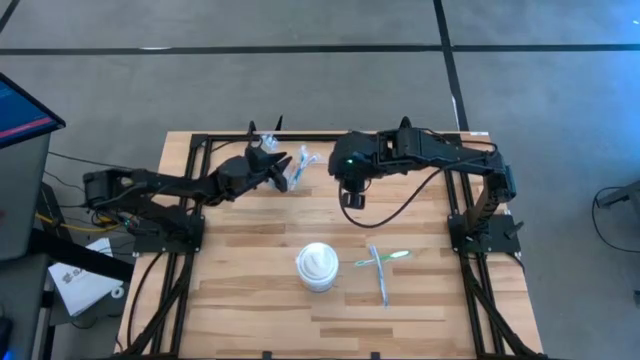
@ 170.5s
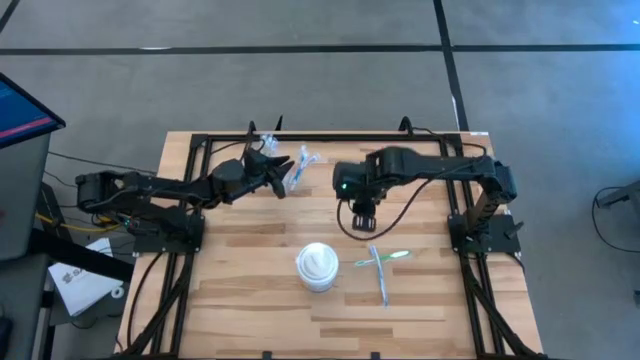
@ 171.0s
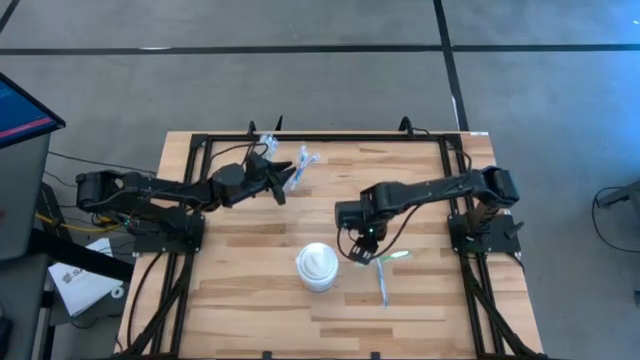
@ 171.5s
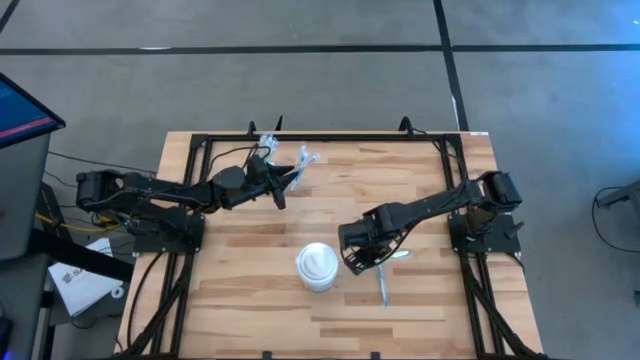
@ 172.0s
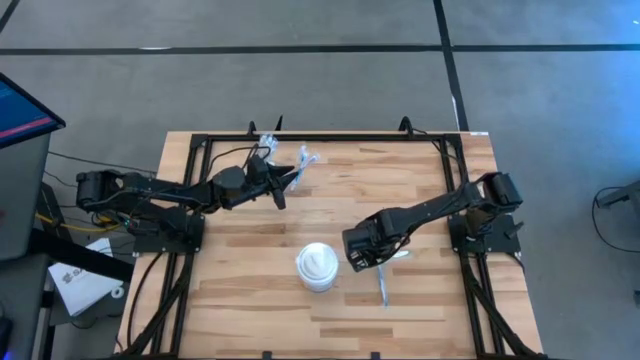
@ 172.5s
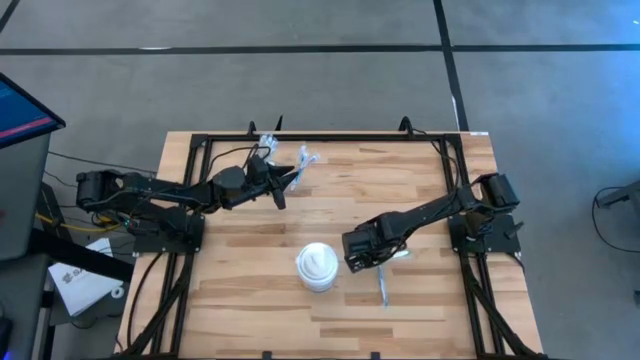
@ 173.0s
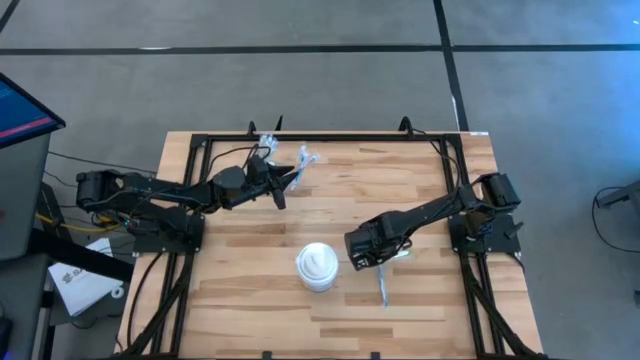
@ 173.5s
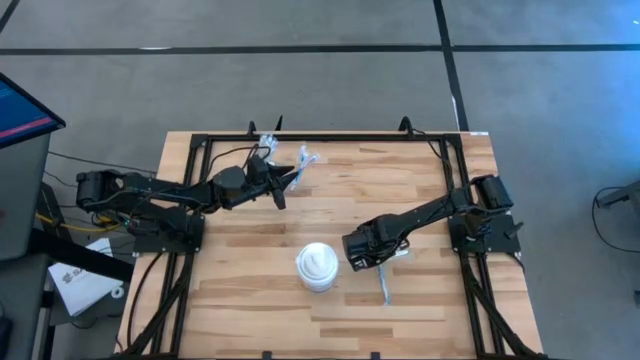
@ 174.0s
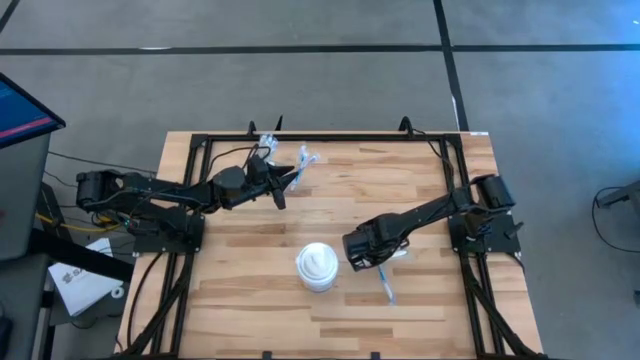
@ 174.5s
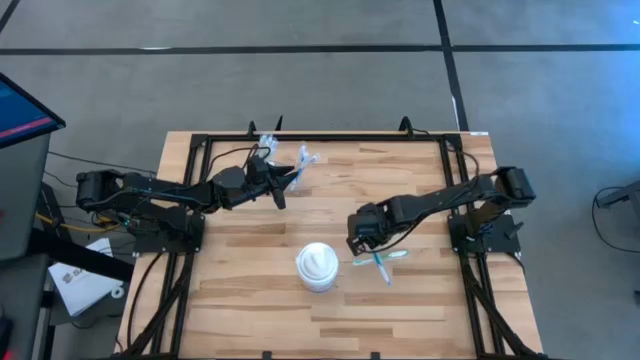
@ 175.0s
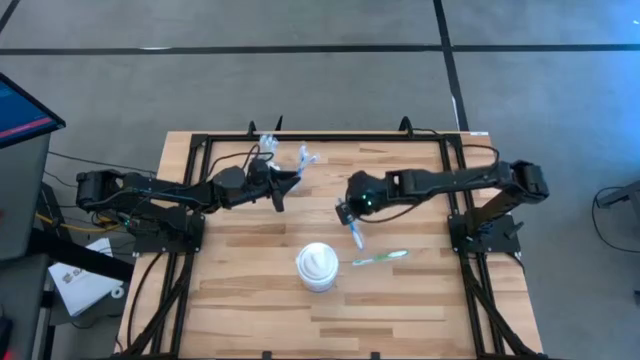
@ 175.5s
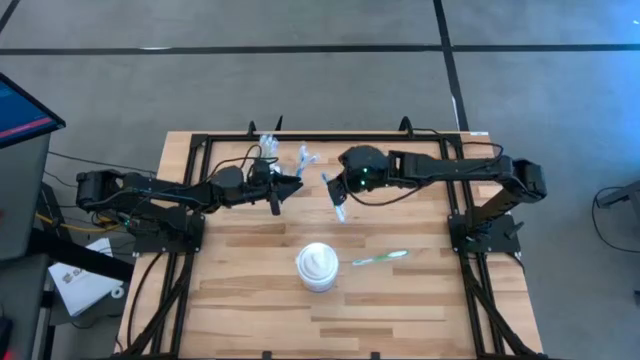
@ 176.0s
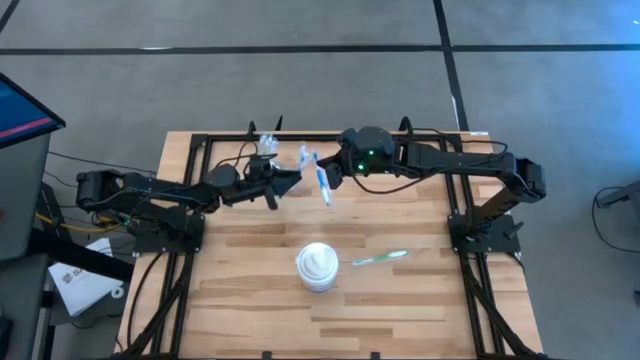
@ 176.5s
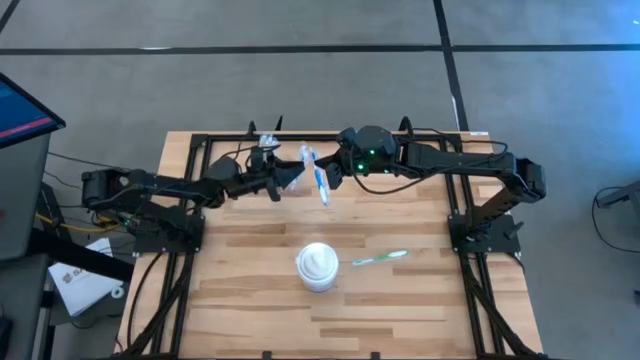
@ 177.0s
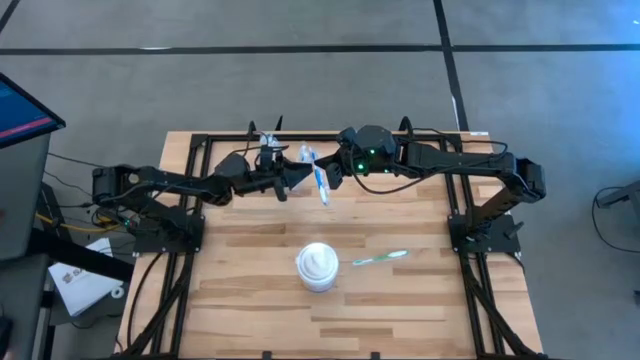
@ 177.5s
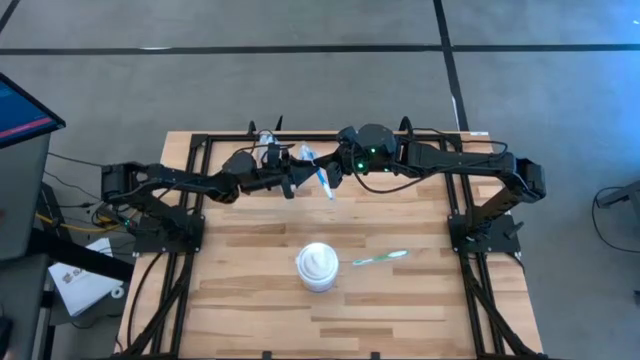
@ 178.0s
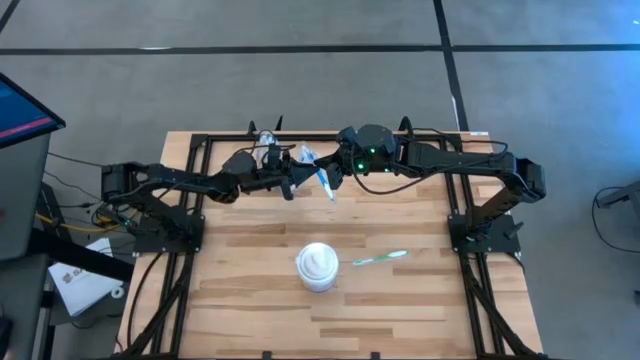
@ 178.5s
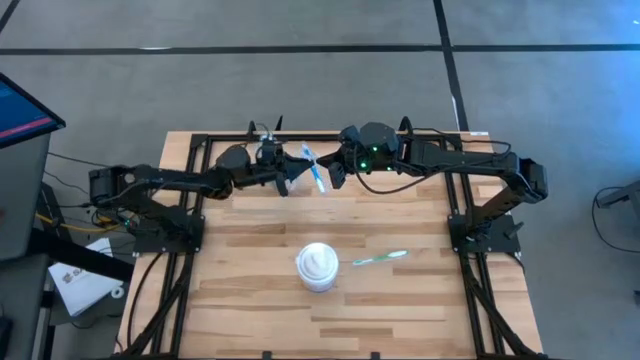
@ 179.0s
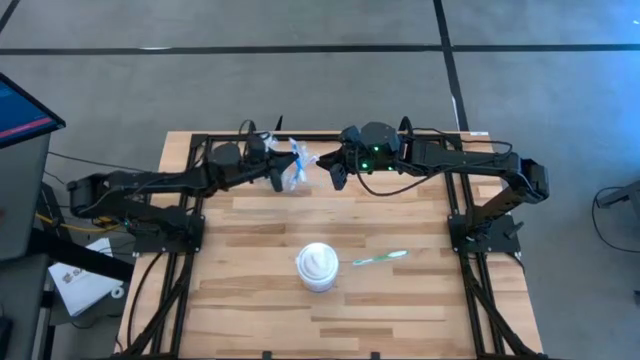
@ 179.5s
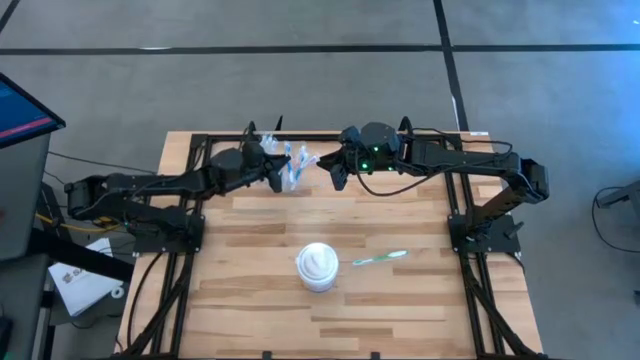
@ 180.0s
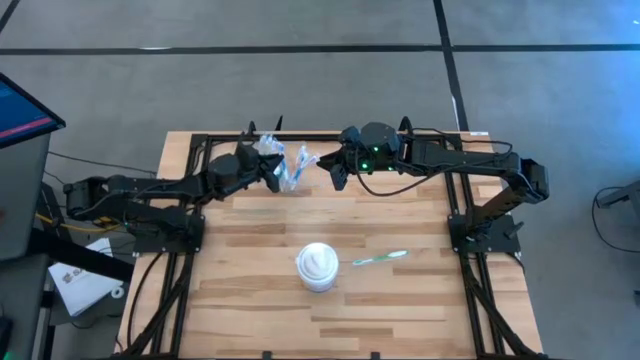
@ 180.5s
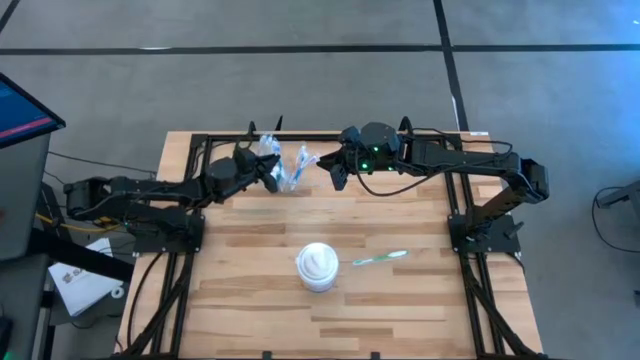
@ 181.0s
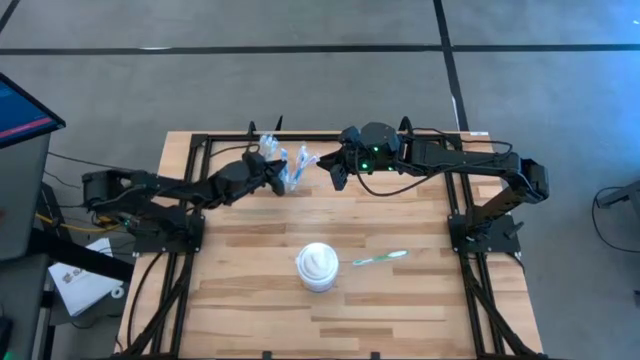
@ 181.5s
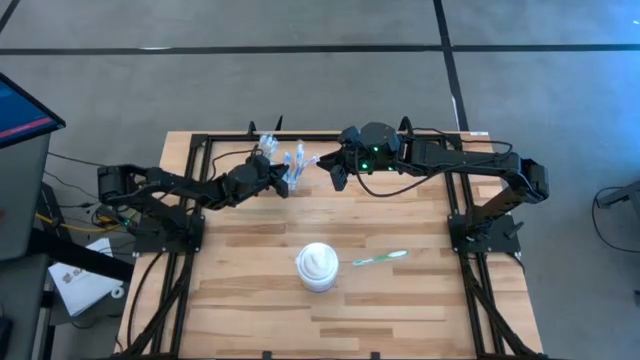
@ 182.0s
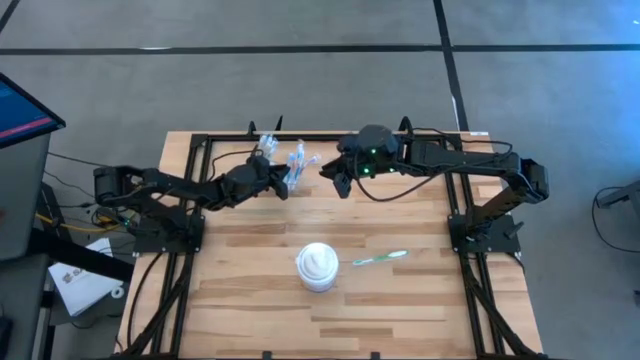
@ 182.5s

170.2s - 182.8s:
Task: Pick & Place toothbrushing station
Put the blue toothbrush into the transparent organizer

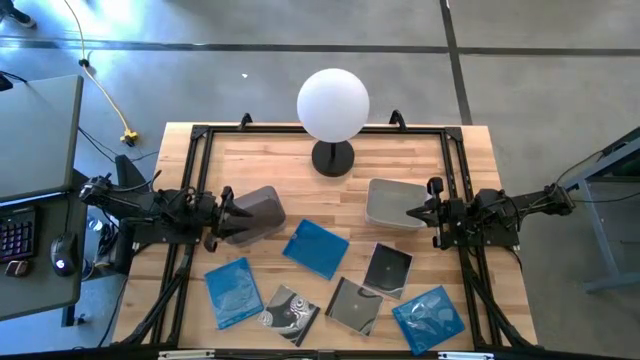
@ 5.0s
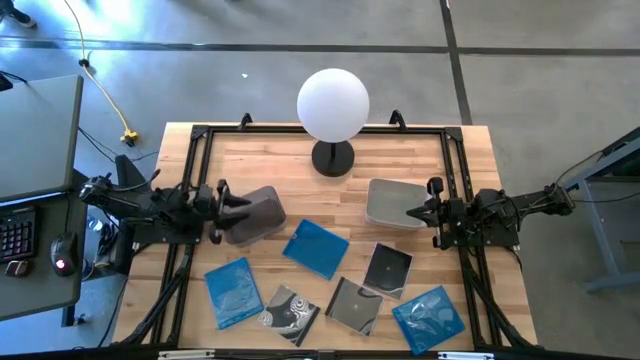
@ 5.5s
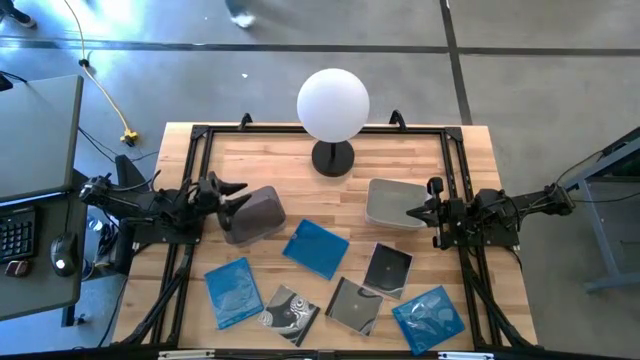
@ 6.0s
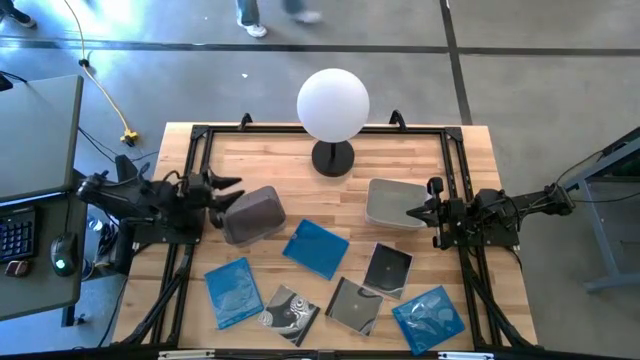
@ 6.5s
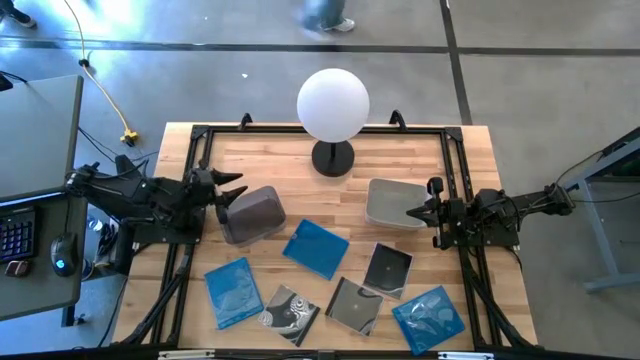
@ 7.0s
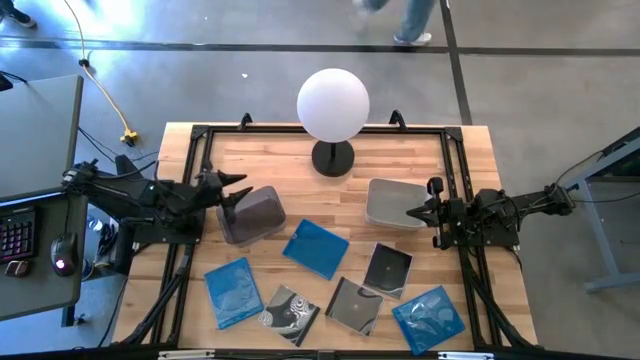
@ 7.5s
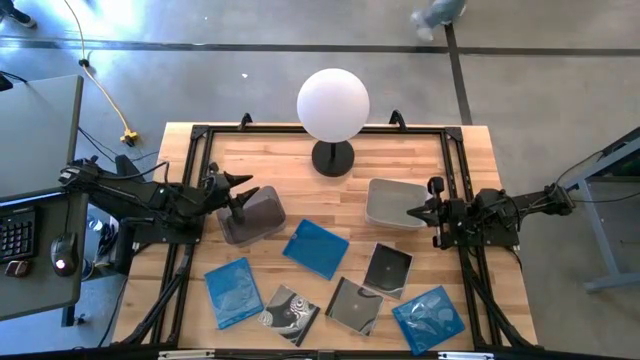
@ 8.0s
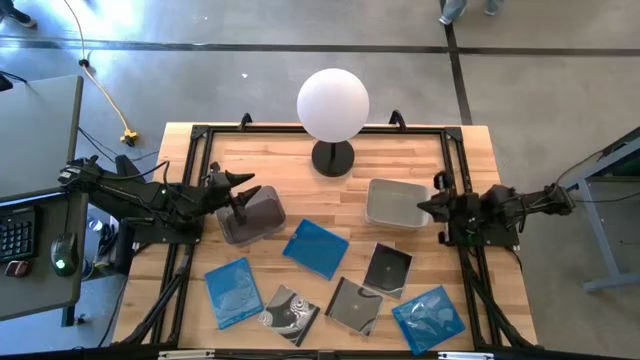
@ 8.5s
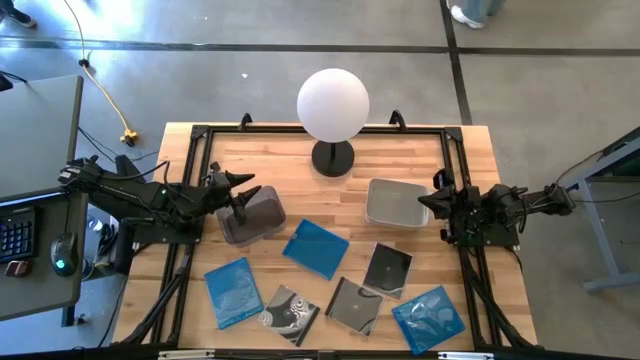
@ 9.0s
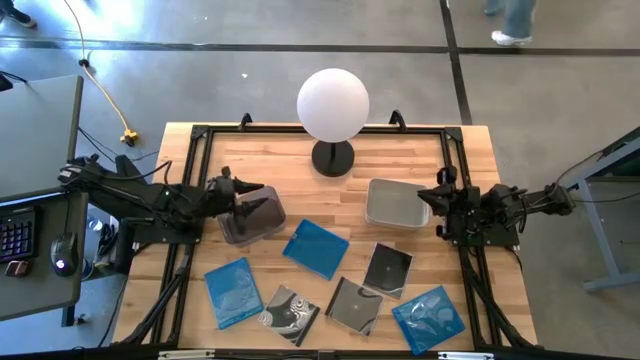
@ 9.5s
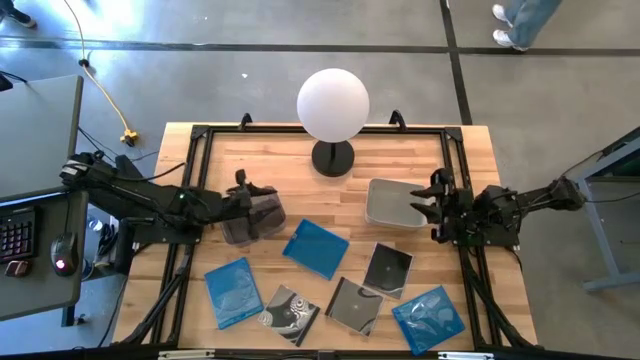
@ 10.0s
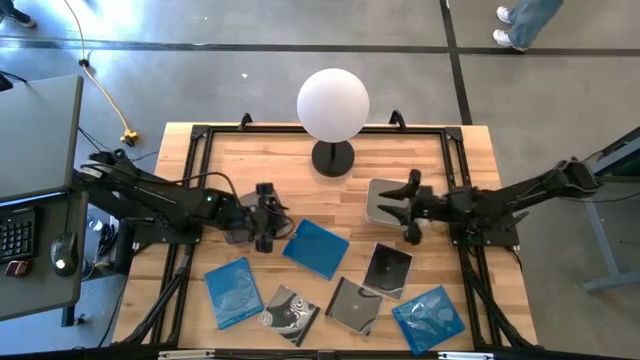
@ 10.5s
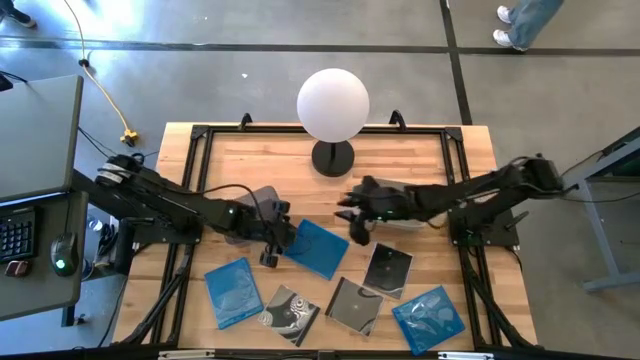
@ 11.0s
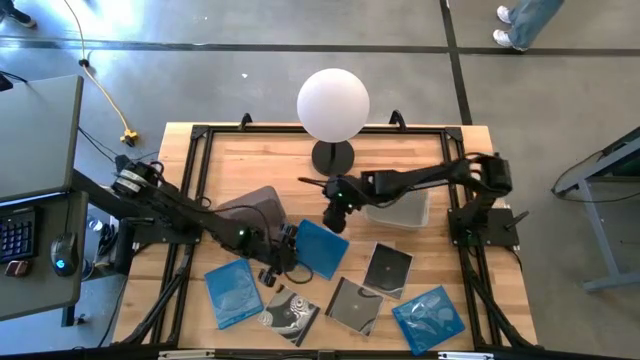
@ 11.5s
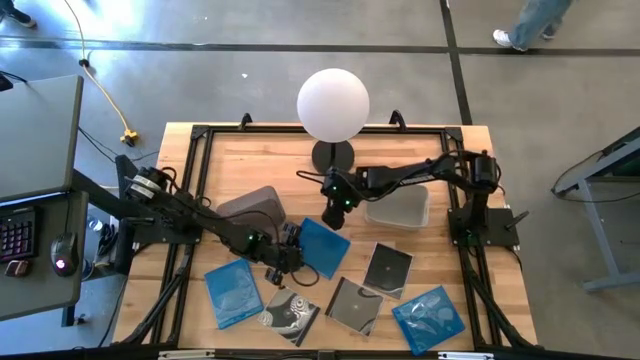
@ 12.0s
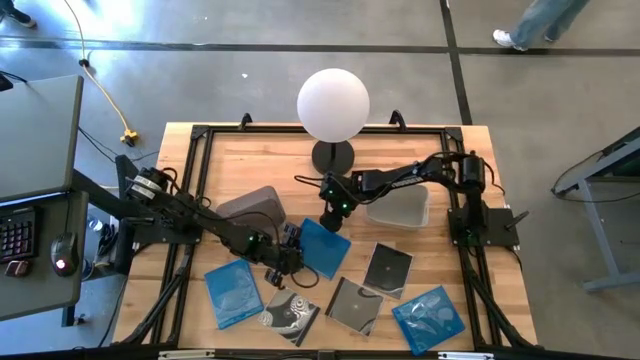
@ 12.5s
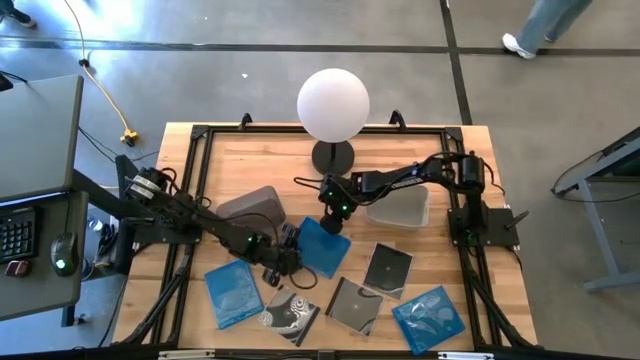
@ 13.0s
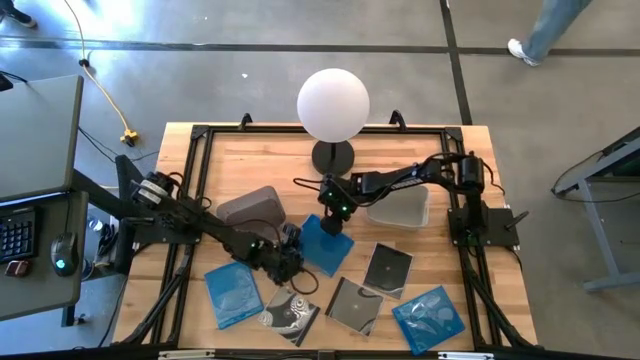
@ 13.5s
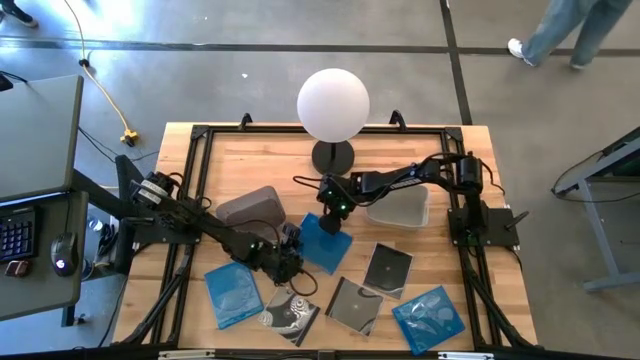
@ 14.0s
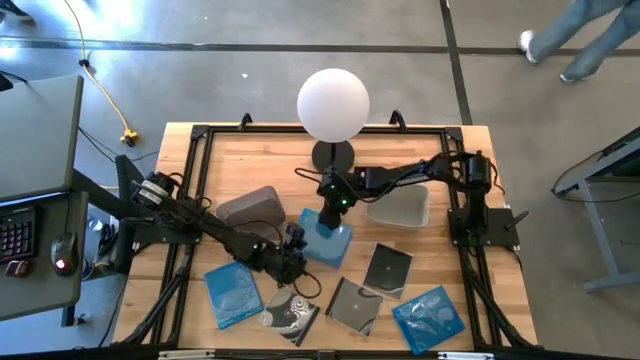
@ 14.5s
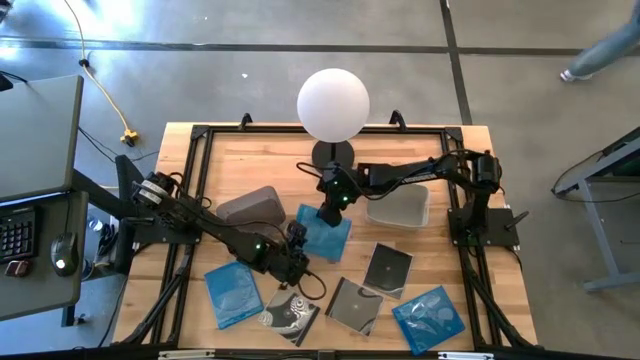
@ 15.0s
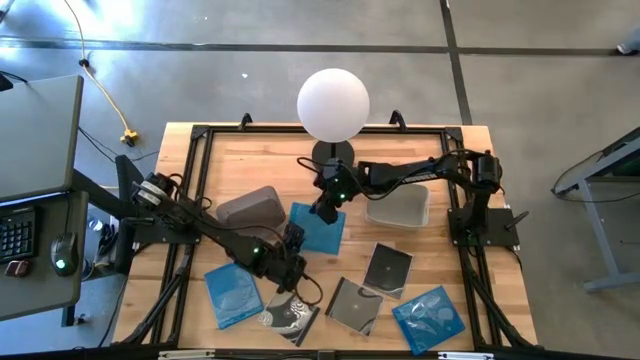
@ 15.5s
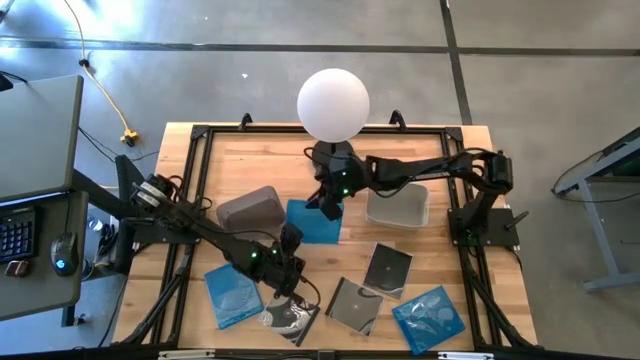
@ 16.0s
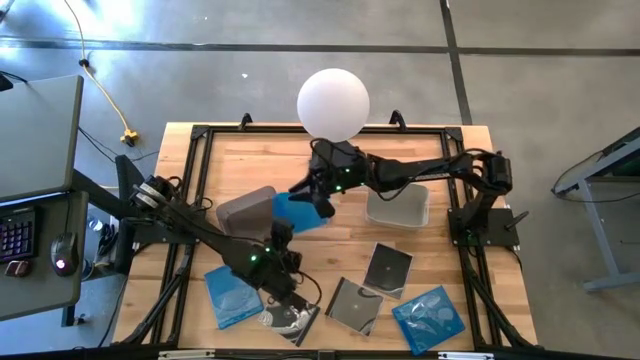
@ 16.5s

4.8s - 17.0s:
Task: Pick & place jewel cases by type
Put the top blue cd case into the black bin
